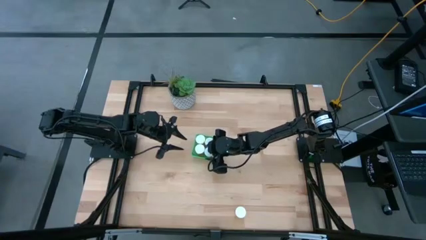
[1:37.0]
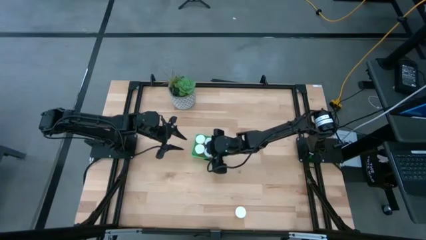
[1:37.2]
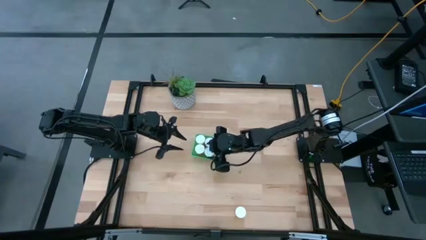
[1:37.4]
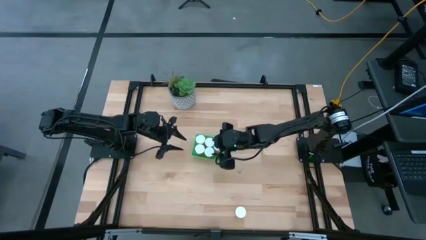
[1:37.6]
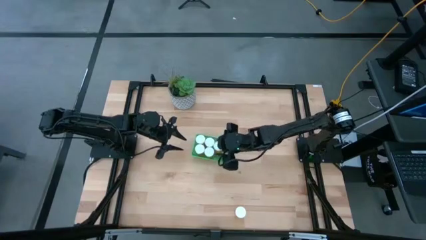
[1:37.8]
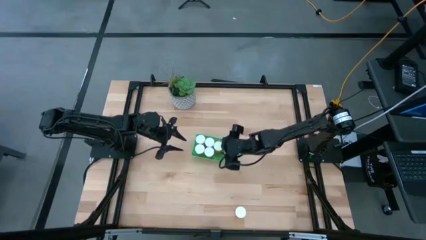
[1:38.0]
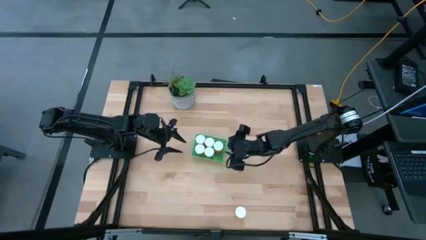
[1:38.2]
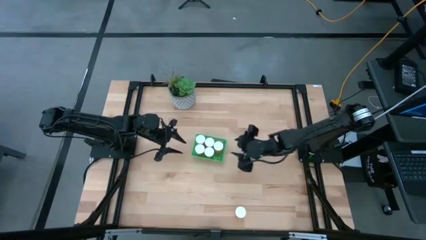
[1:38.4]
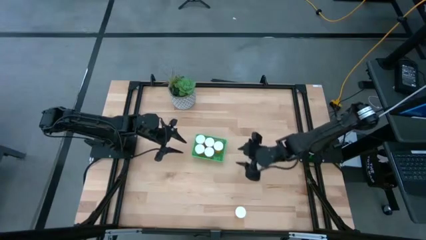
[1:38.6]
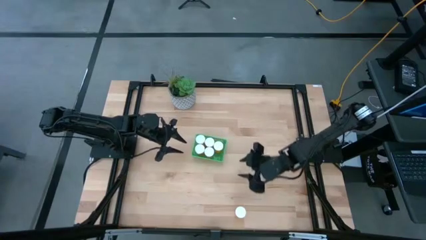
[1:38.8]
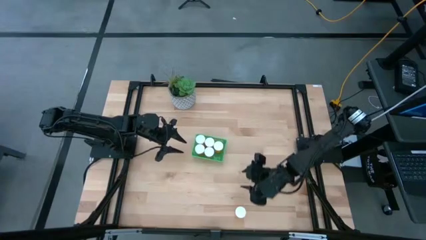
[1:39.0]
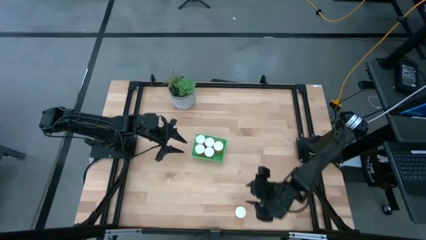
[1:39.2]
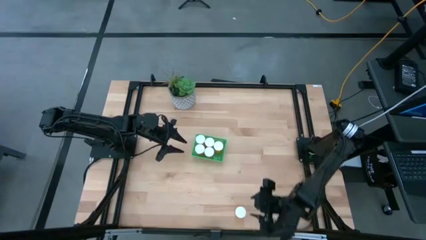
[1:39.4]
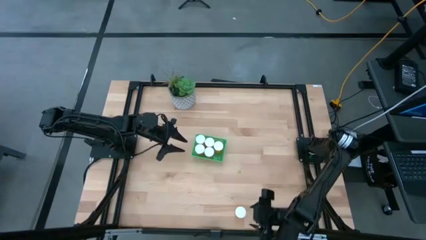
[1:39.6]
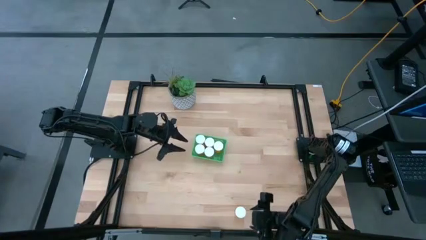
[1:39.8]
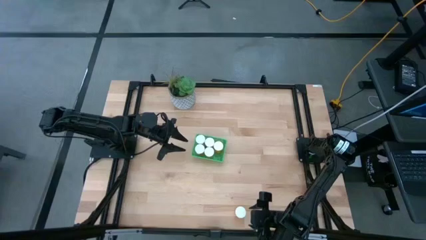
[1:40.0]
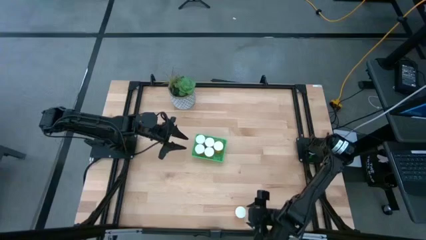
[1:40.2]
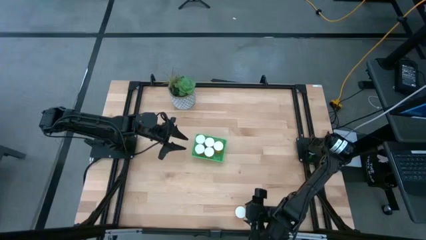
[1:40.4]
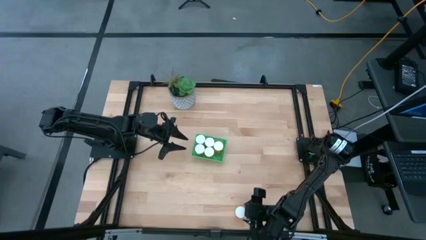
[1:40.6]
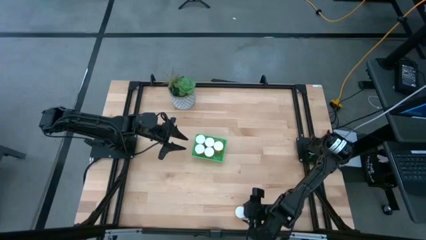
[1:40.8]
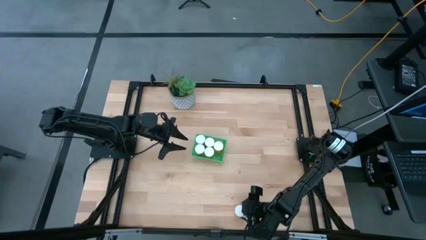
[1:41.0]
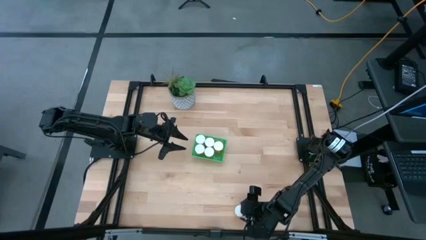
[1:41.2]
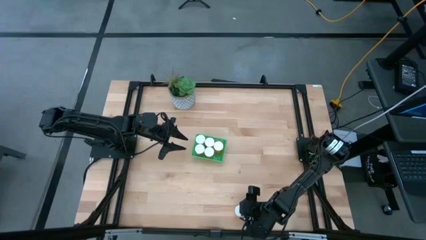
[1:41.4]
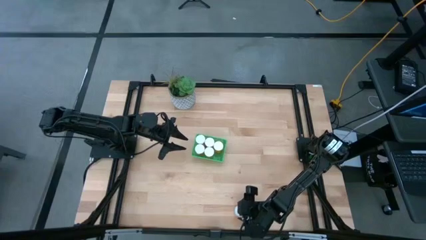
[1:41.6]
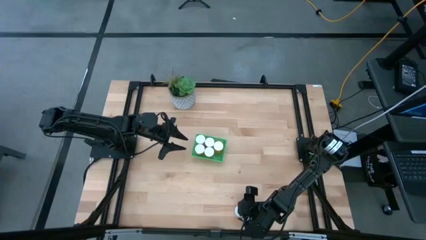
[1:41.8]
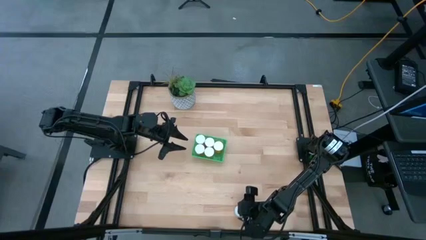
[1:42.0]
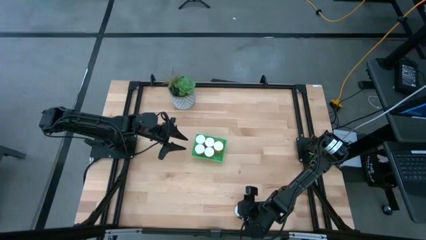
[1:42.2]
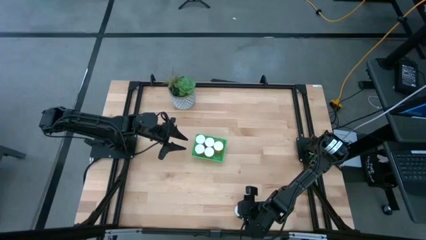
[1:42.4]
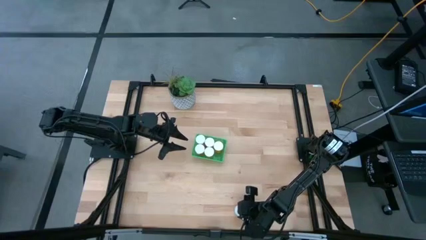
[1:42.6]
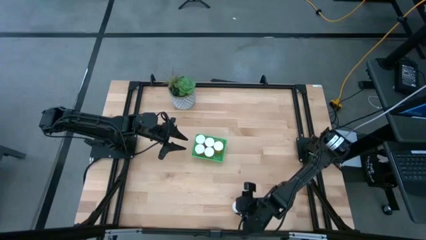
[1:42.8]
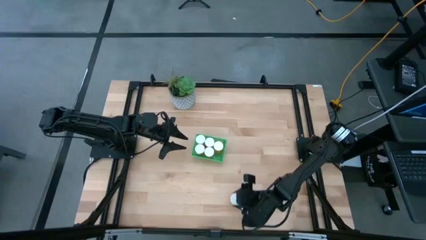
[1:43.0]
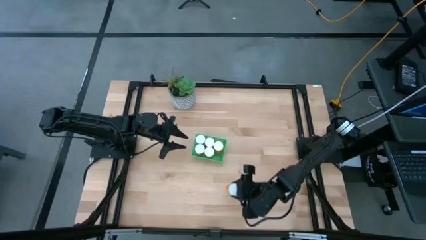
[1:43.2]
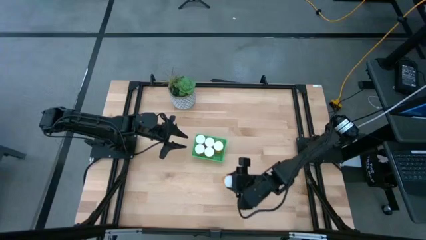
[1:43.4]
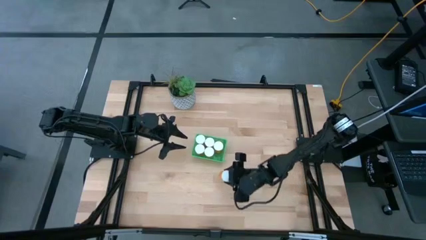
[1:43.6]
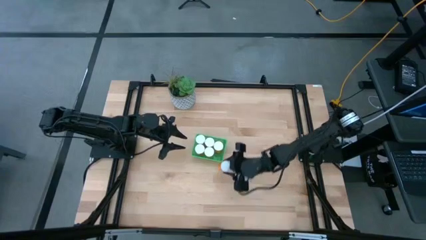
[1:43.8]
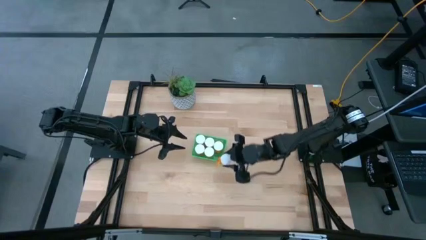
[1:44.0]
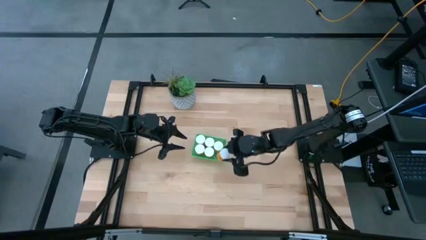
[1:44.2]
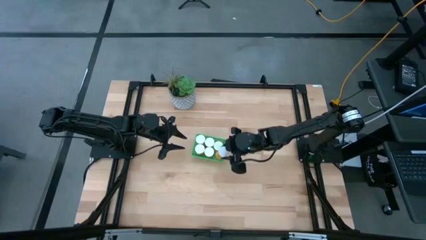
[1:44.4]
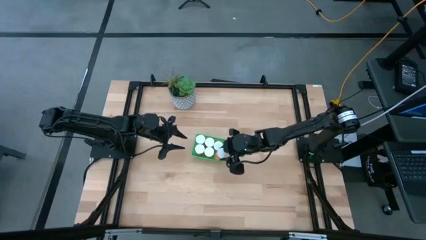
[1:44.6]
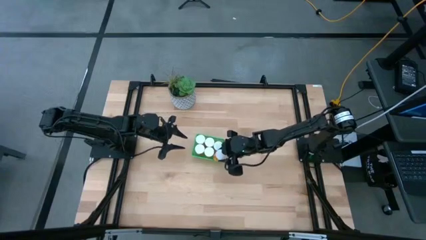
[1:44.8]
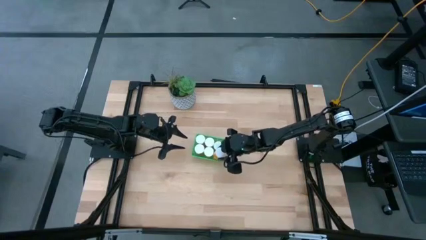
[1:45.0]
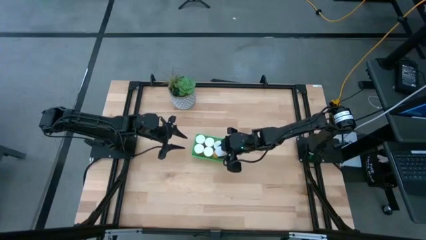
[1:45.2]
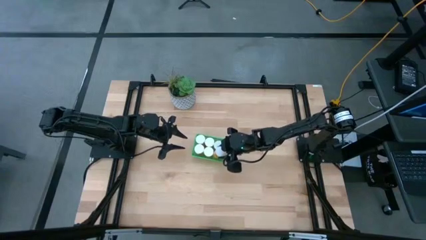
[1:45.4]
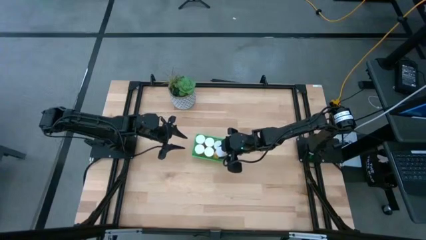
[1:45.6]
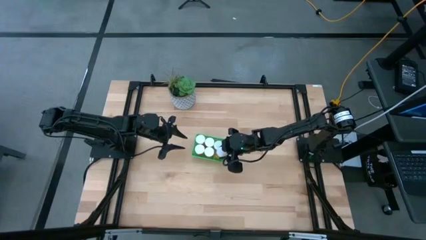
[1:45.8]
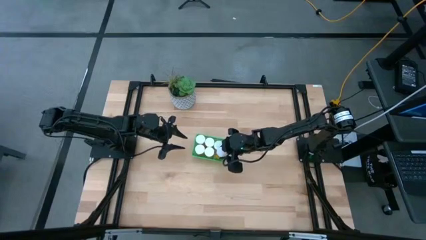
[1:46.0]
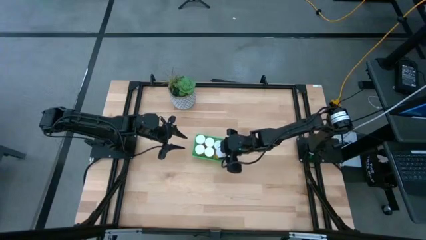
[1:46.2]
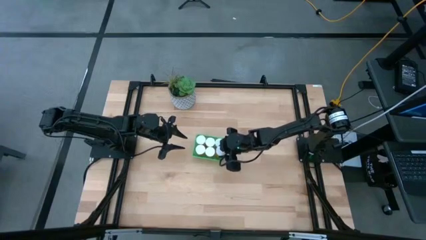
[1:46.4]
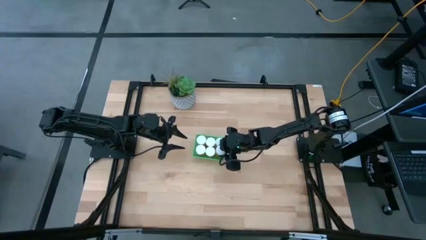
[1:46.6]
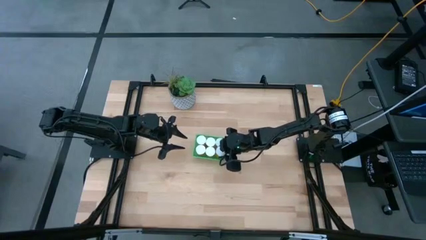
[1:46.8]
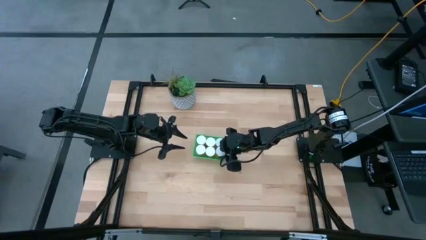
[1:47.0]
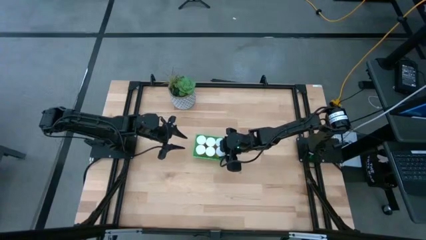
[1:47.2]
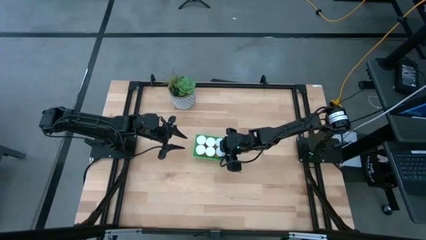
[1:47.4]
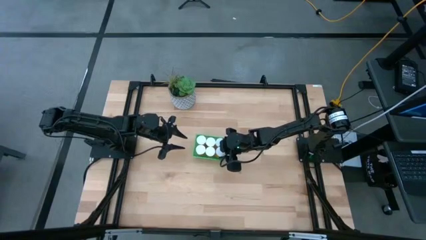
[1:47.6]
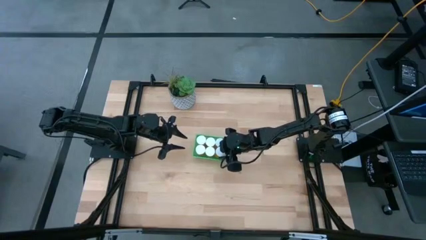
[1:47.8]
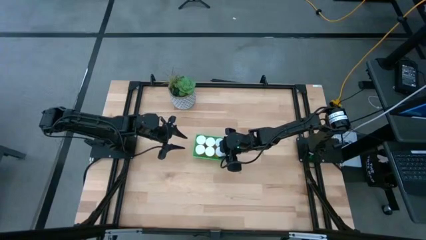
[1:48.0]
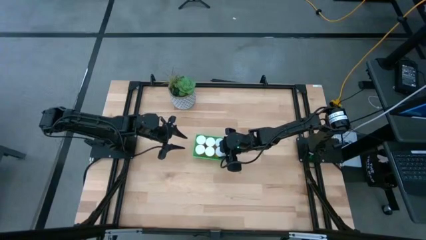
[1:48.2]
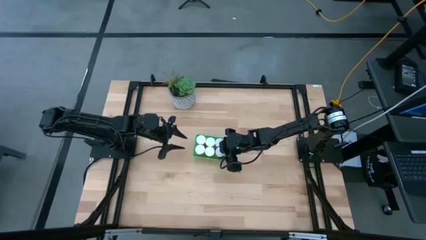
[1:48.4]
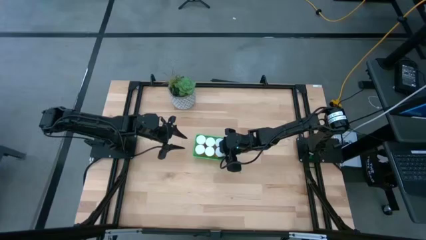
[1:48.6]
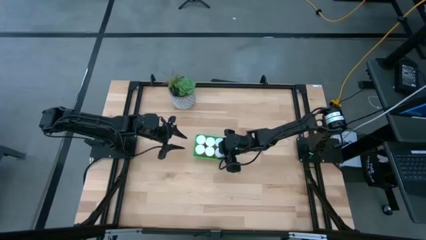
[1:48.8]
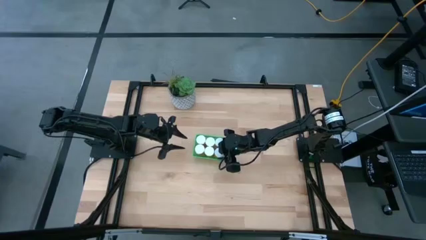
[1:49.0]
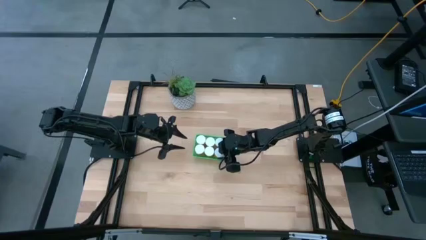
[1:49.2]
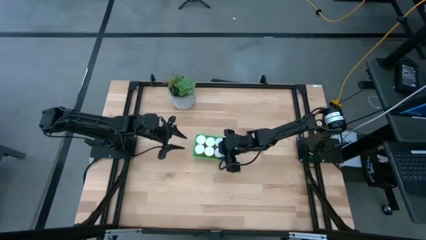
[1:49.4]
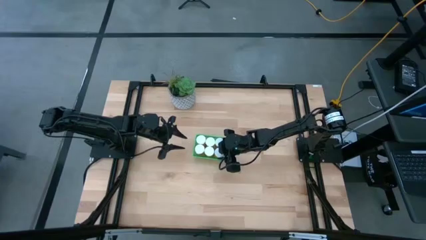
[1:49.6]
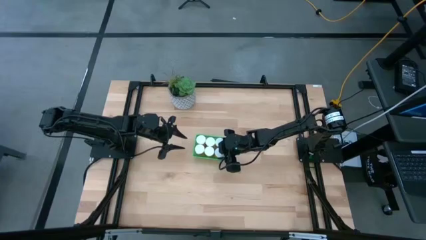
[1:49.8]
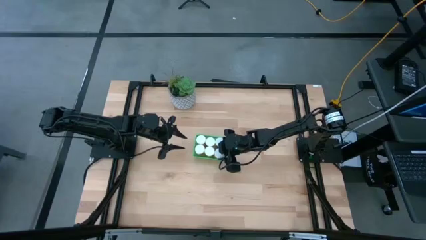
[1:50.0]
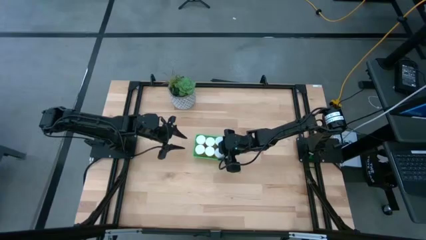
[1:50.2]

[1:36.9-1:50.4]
Task: Pick and place pill bottles into a basket
Put the orange medicine bottle into the green bin
